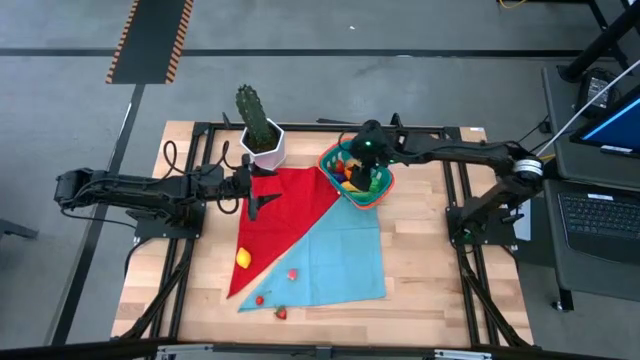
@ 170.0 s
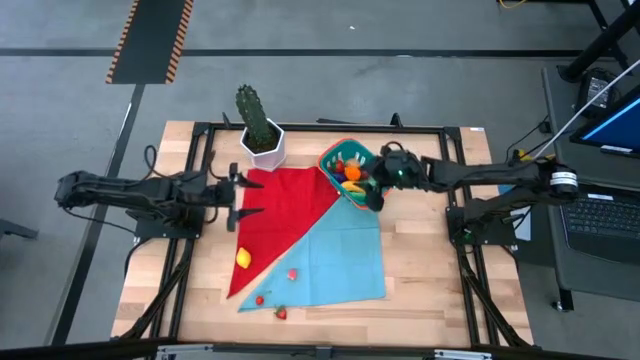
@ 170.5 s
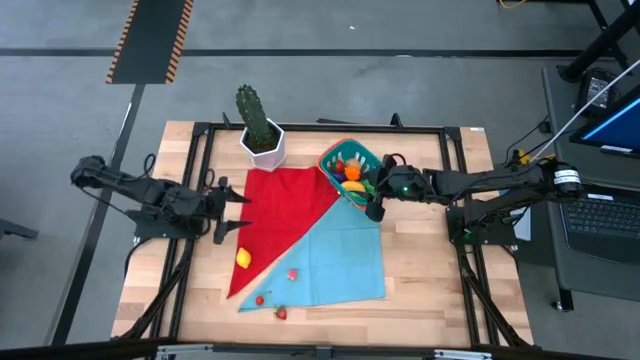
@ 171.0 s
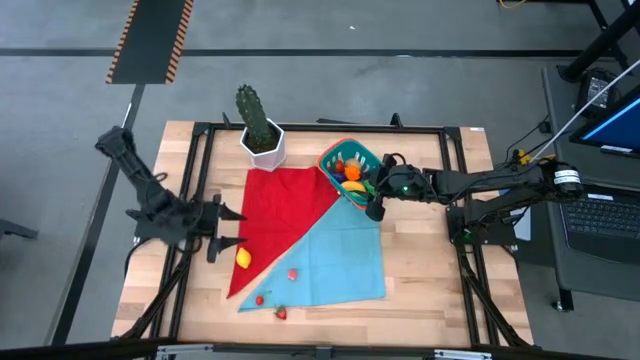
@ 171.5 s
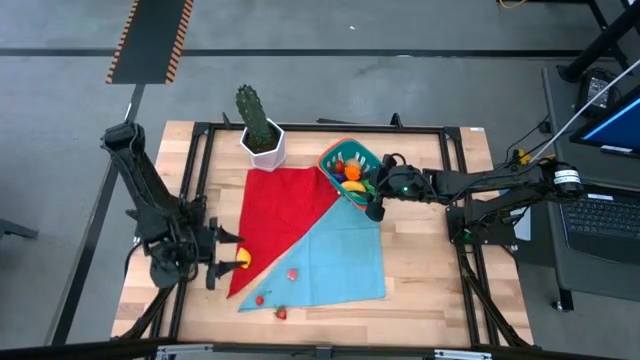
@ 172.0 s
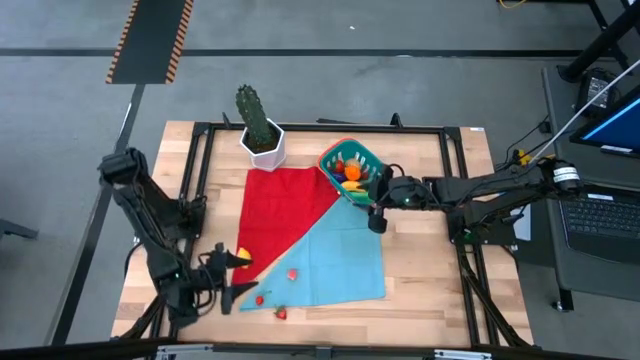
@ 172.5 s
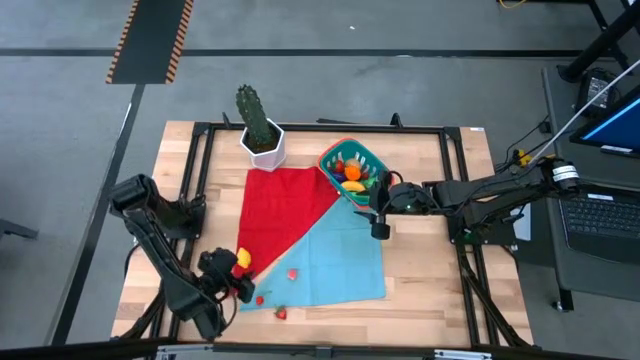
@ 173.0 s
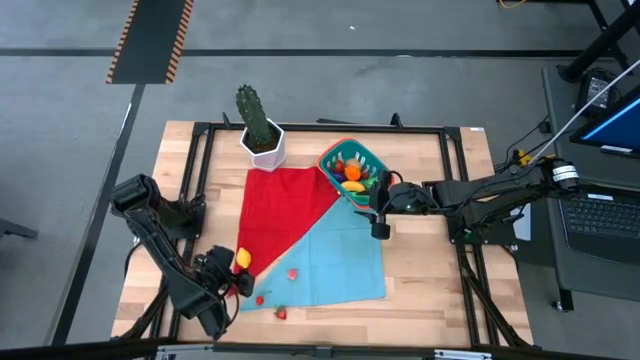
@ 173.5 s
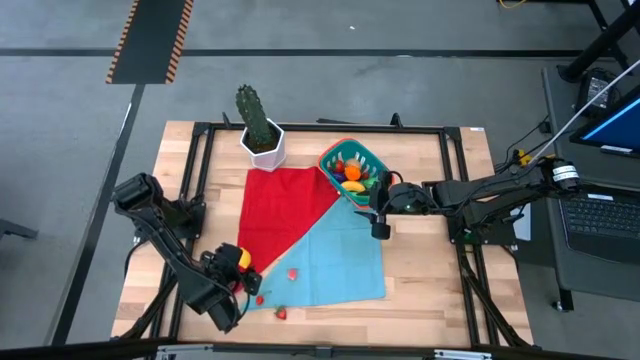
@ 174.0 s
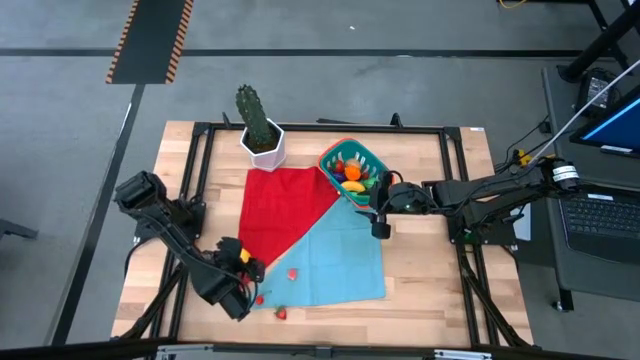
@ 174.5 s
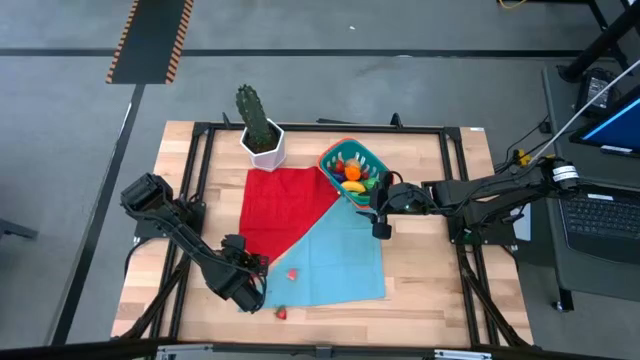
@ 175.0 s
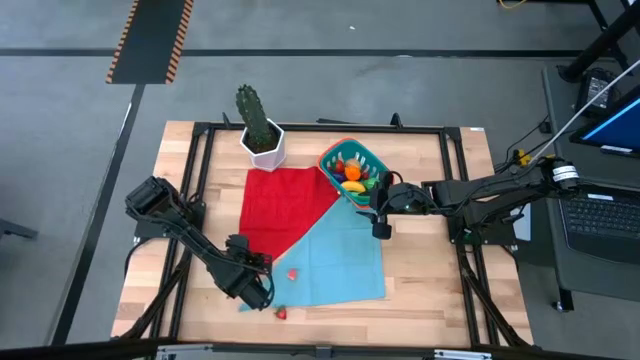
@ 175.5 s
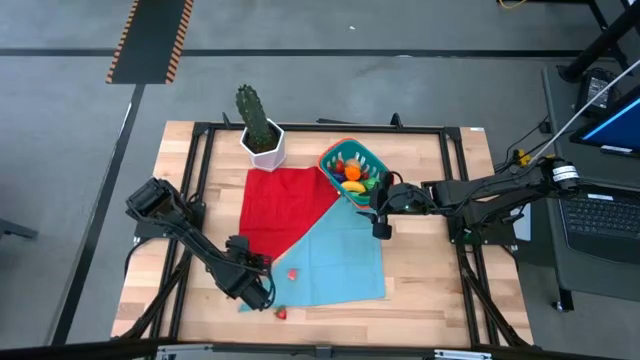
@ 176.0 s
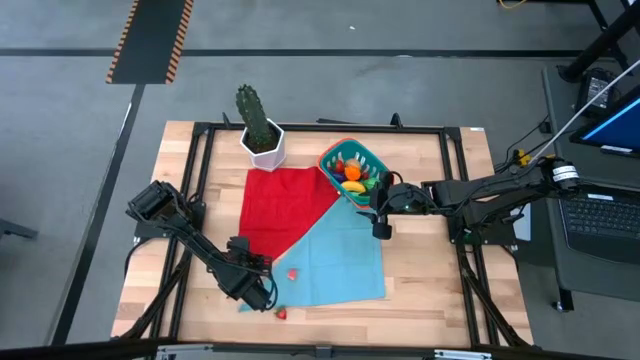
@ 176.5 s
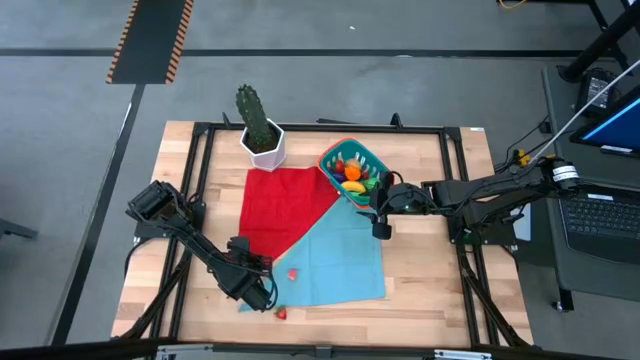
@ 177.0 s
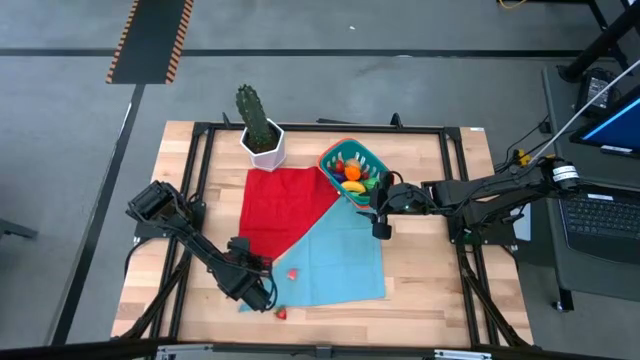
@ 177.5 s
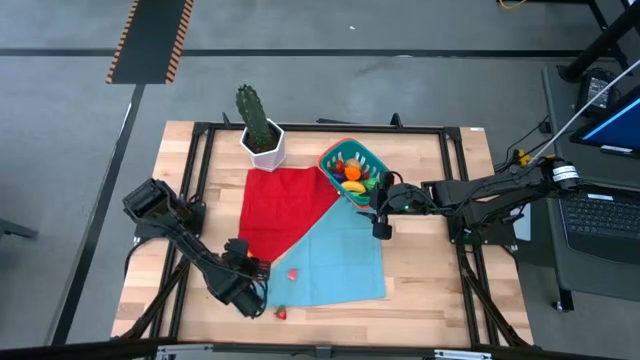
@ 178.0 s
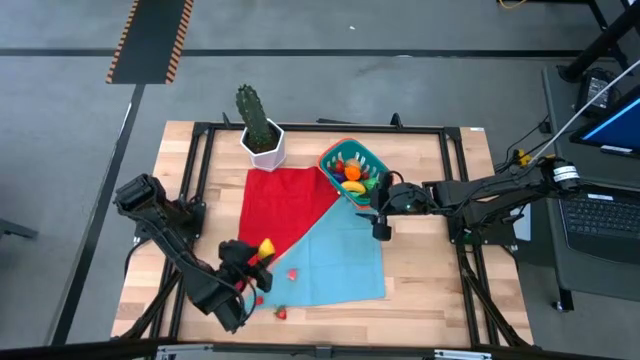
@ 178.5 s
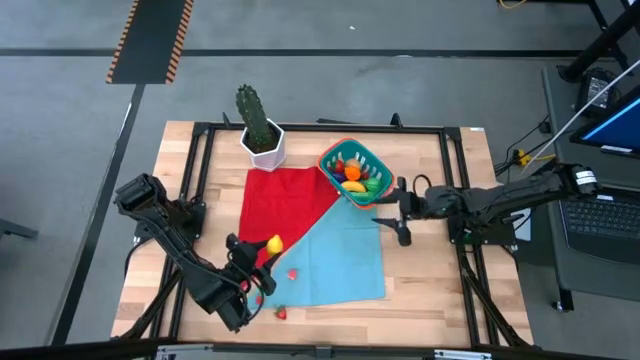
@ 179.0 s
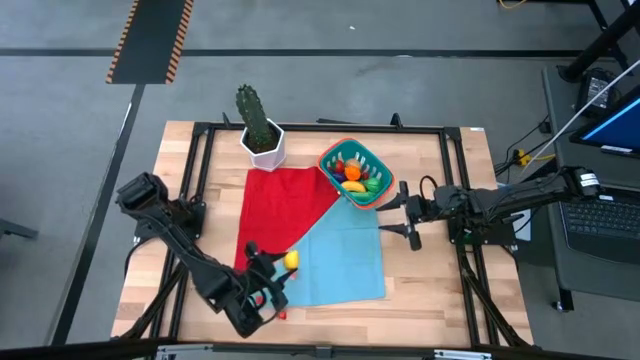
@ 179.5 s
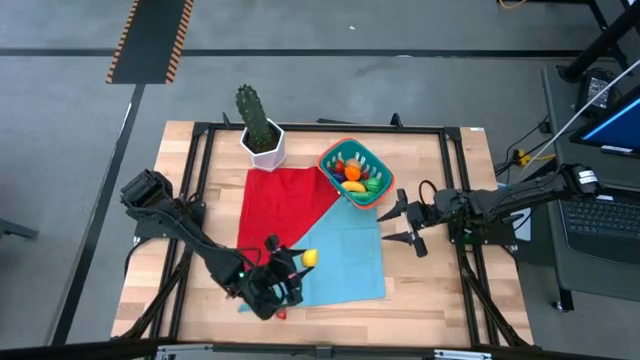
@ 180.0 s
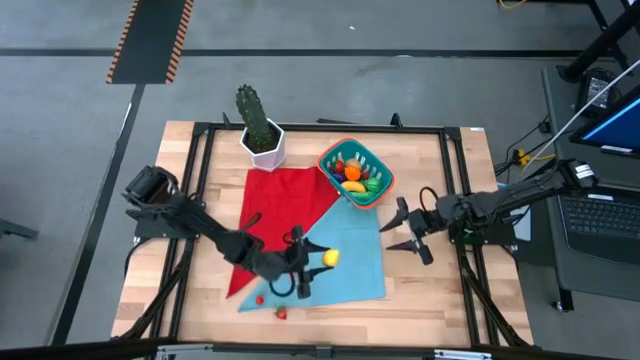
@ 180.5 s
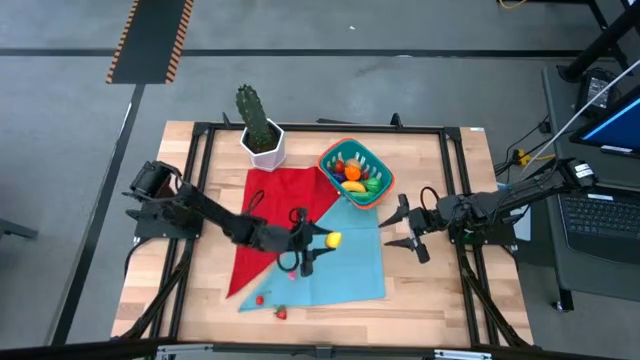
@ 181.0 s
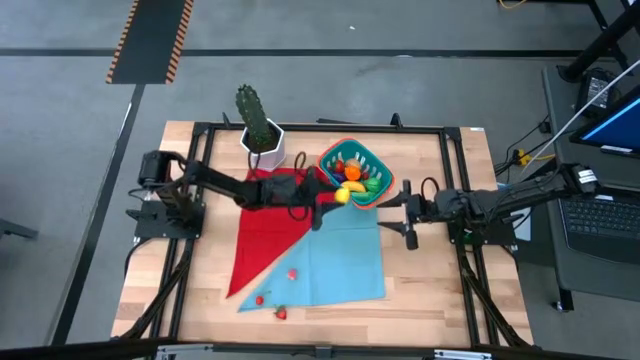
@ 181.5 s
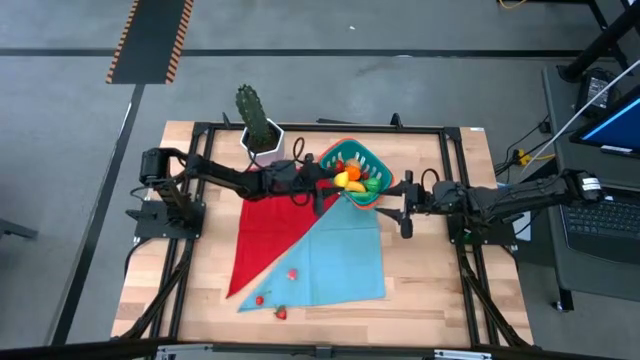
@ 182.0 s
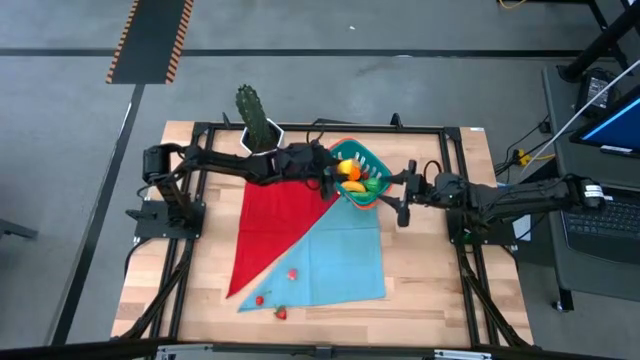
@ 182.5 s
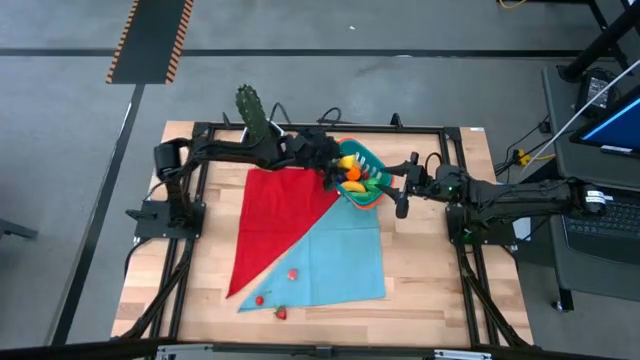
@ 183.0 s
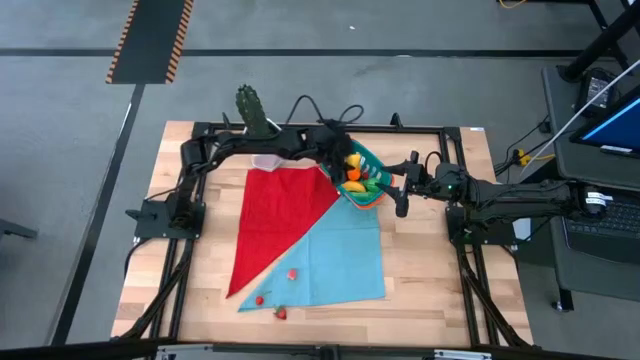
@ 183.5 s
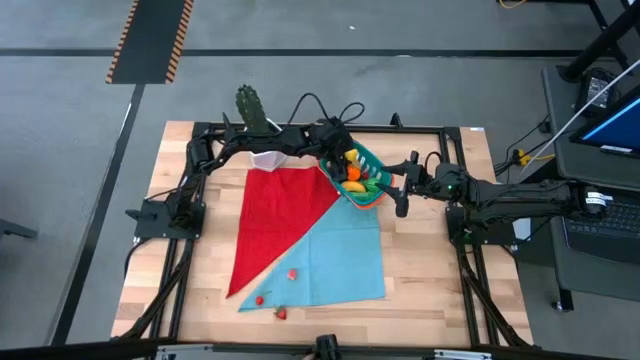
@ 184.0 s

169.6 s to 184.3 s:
Task: Build produce basket
Put the yellow lemon into the blue basket

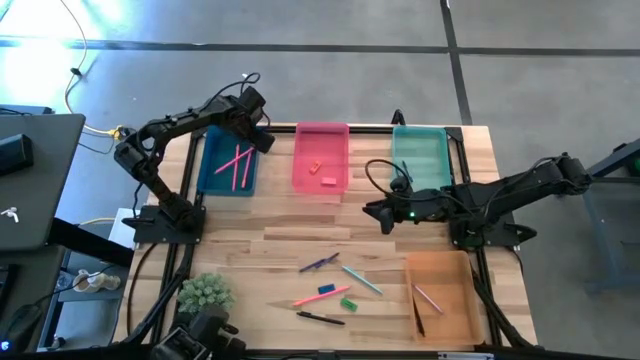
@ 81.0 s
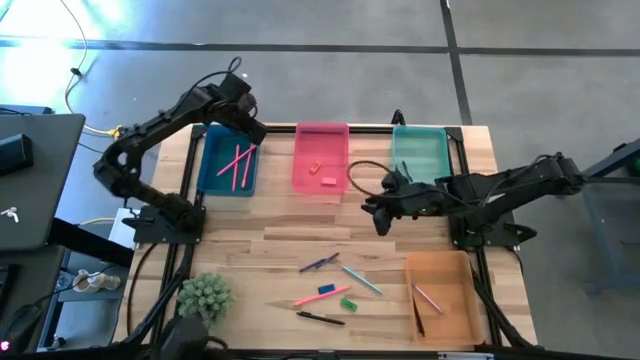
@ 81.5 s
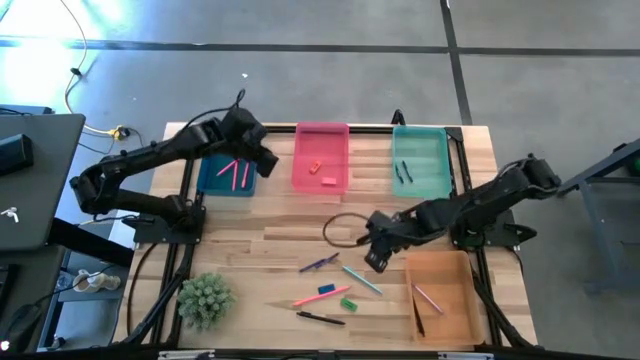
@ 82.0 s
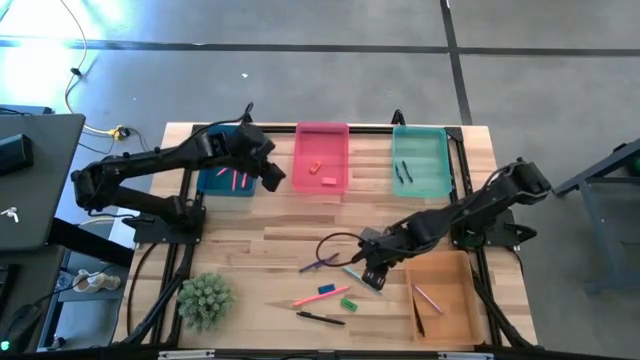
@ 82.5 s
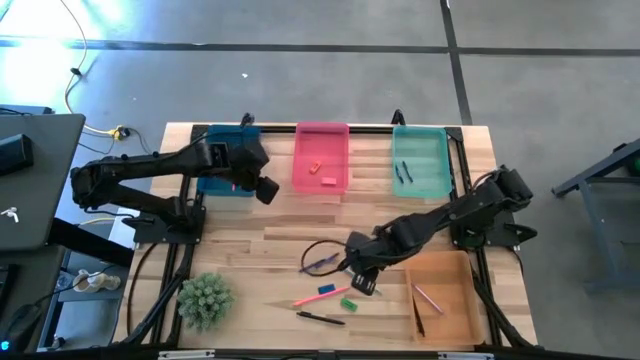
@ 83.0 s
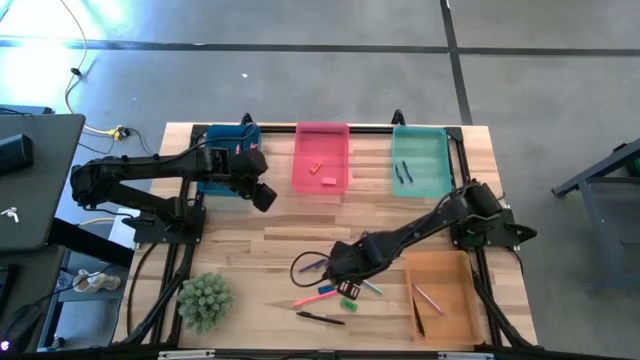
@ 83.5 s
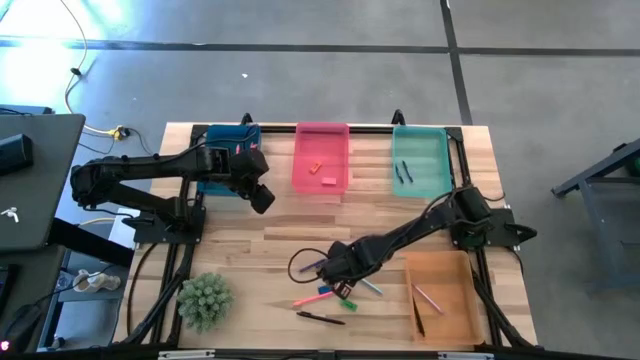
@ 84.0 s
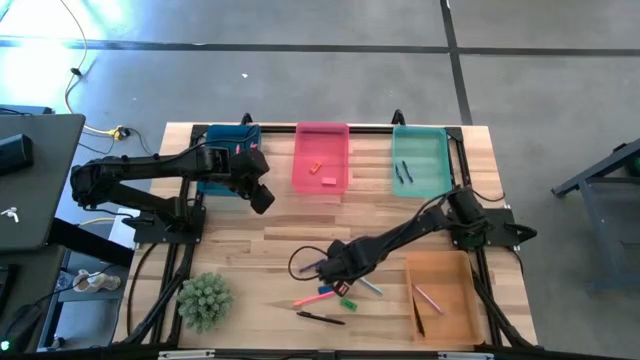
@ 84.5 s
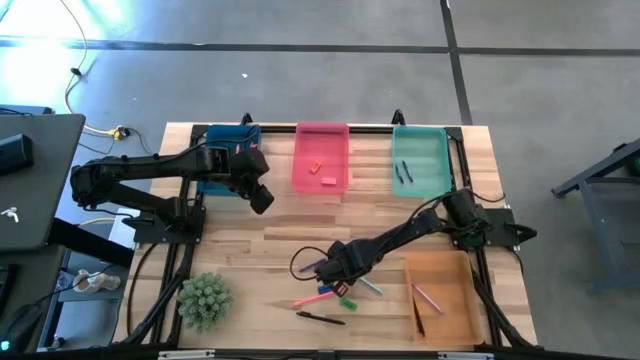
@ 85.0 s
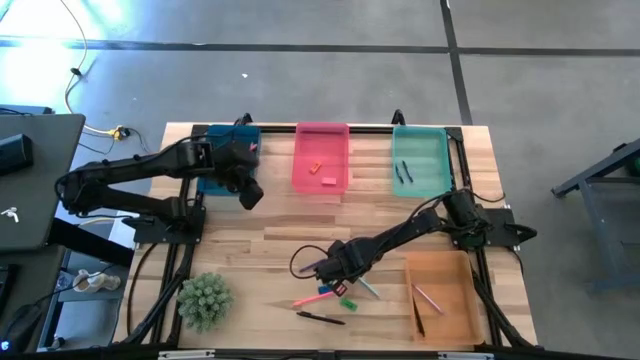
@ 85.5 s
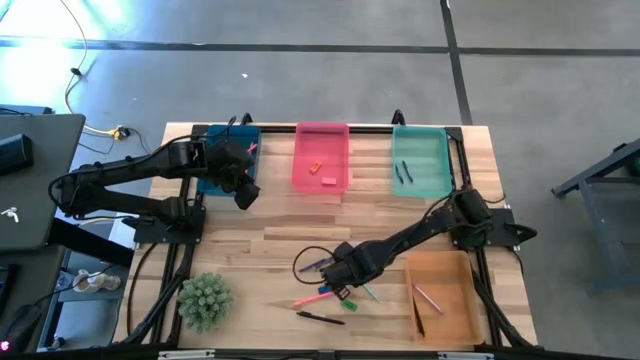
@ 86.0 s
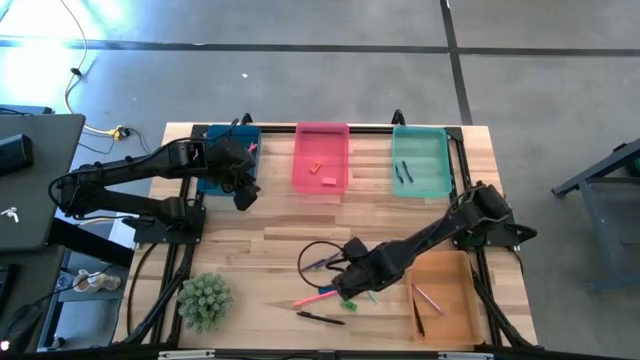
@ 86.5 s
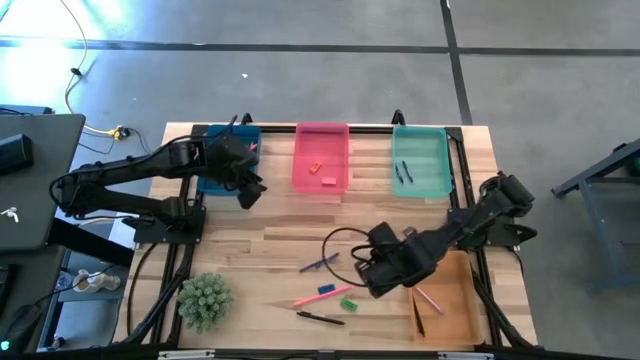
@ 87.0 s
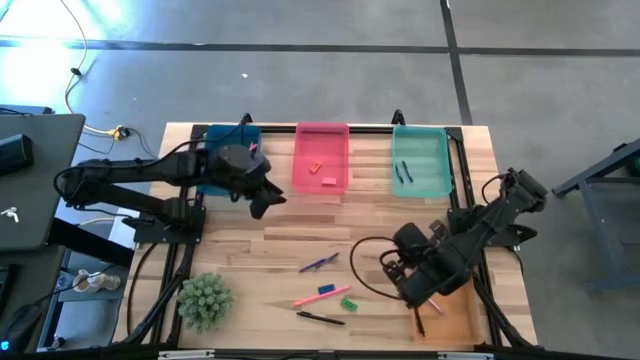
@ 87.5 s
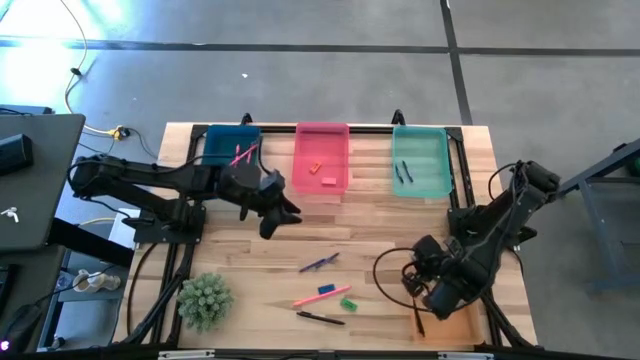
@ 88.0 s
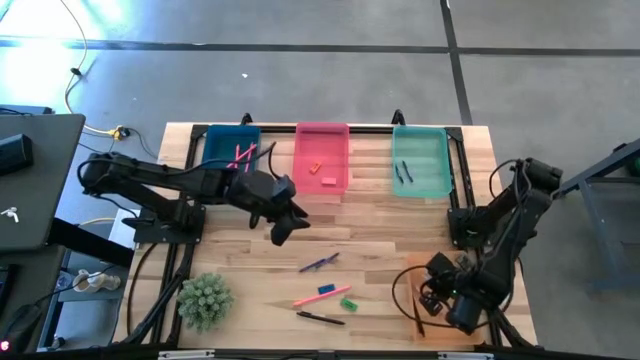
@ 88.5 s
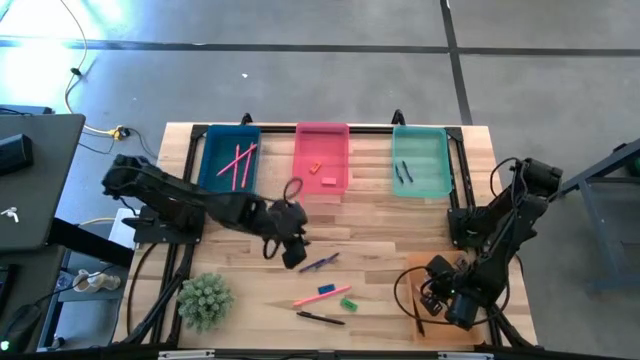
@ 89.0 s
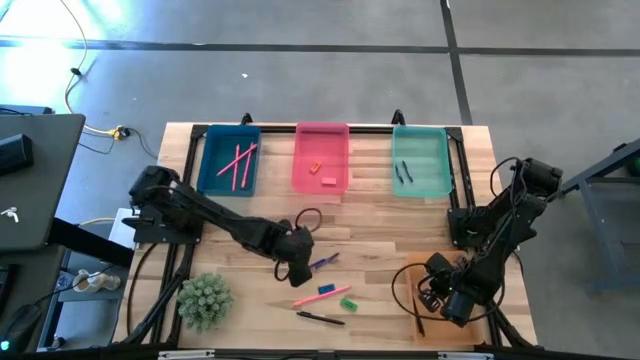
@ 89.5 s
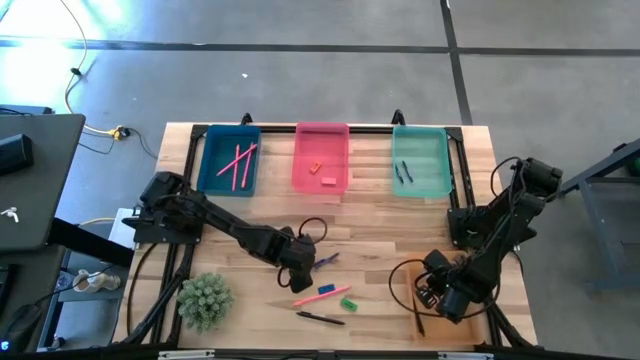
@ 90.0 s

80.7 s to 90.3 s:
Task: Sort crayons/erasers/pens/pencils in bins
Put the light blue pen into the orange bin
